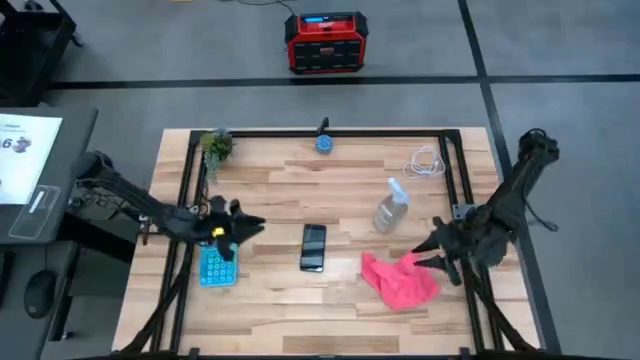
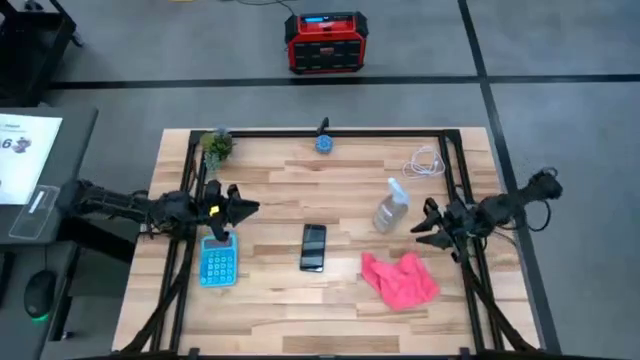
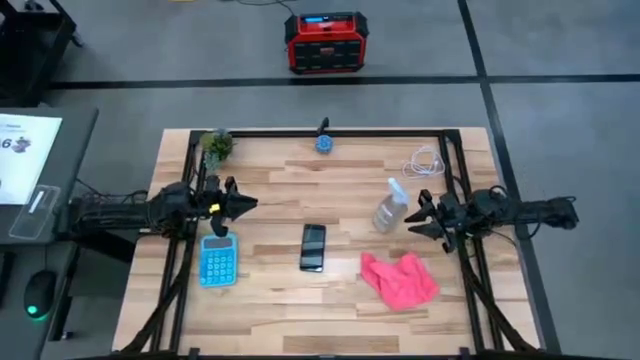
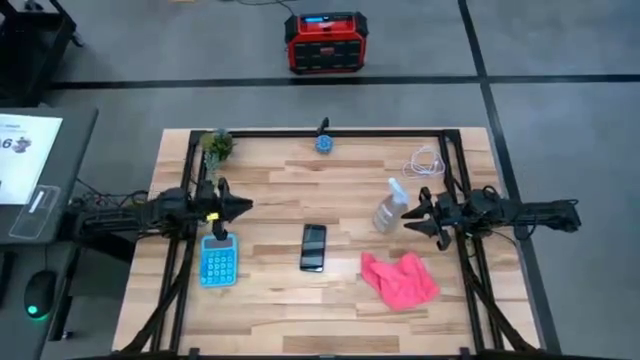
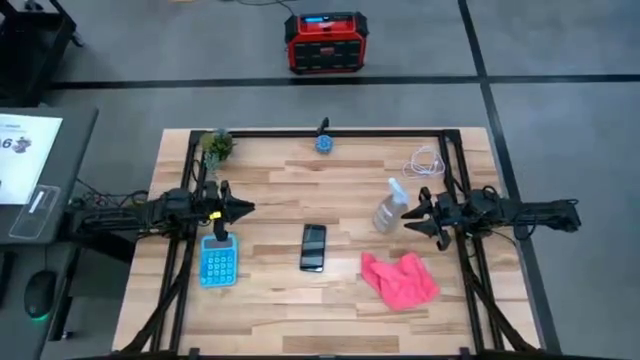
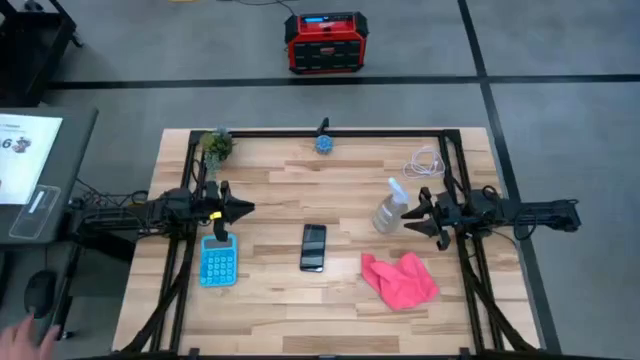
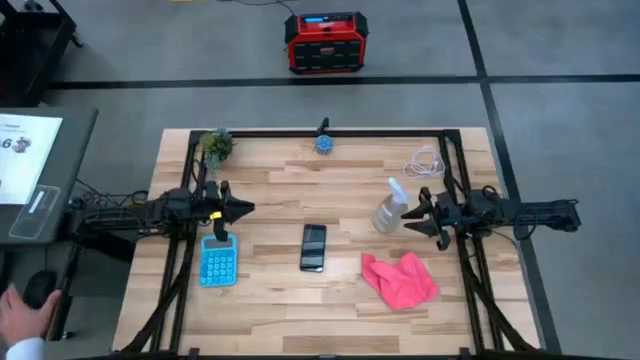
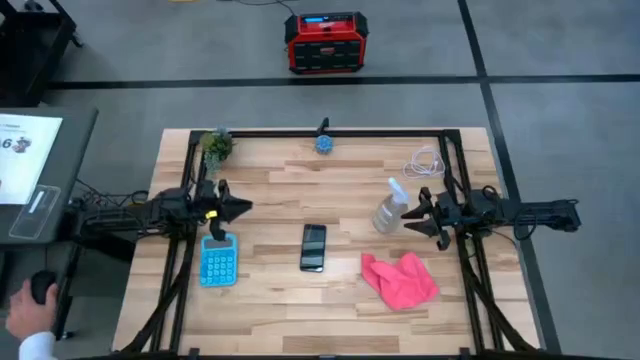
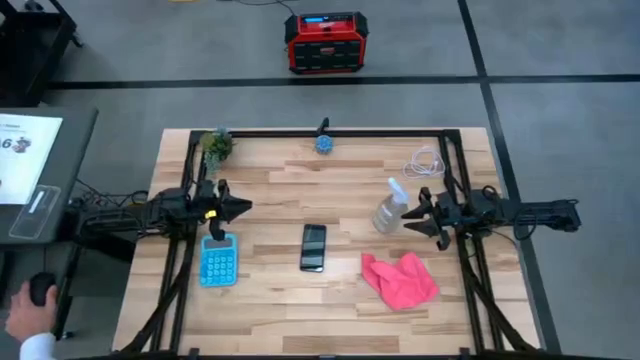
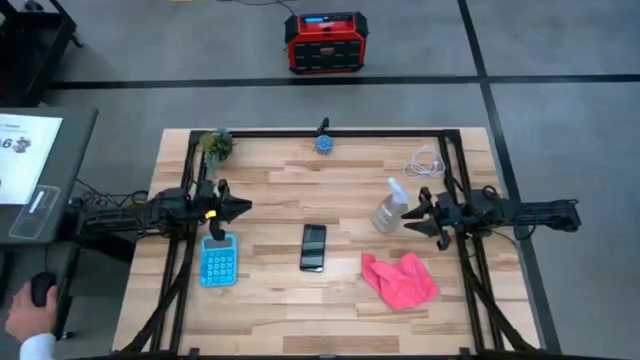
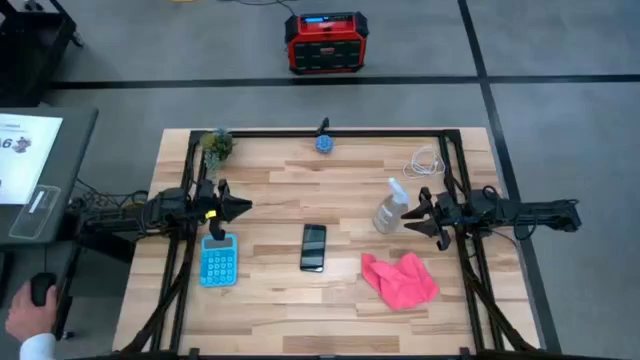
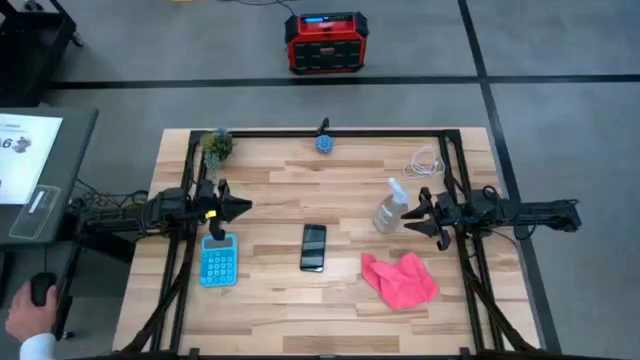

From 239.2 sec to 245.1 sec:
Task: Apply microfiber cloth
Return to Home Position

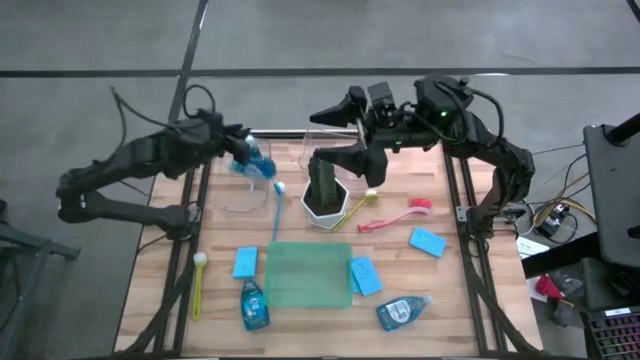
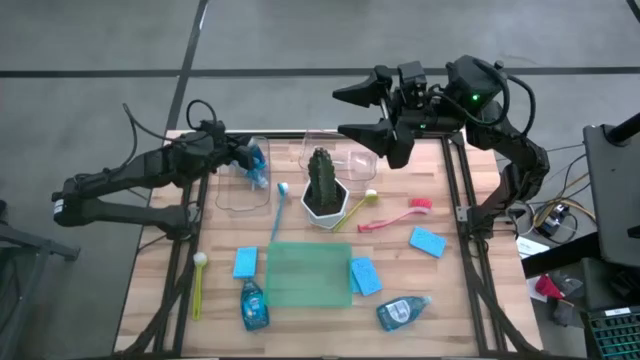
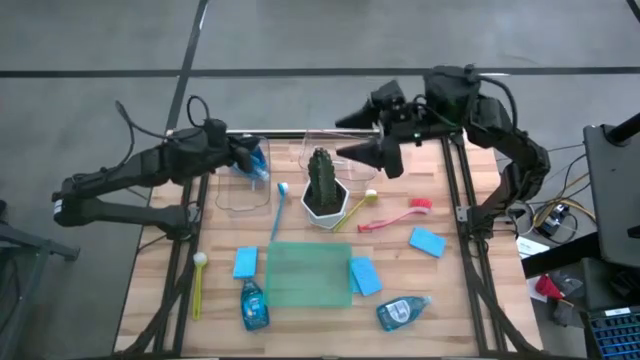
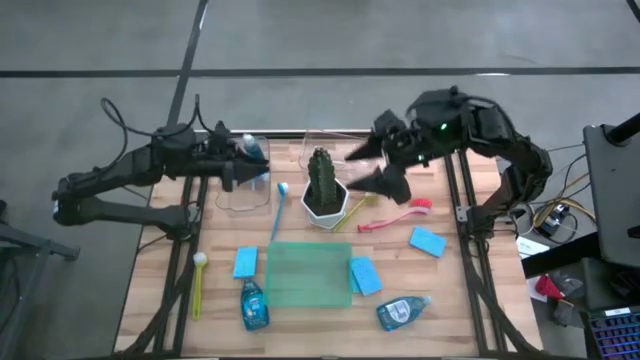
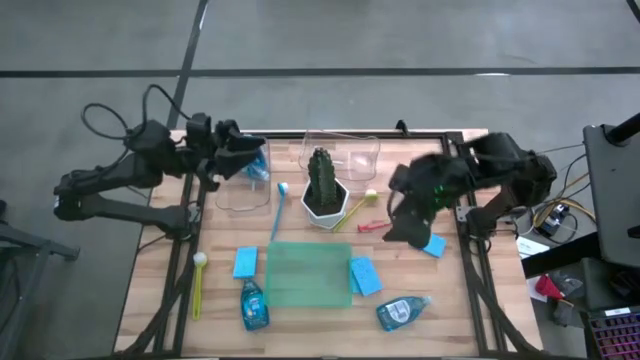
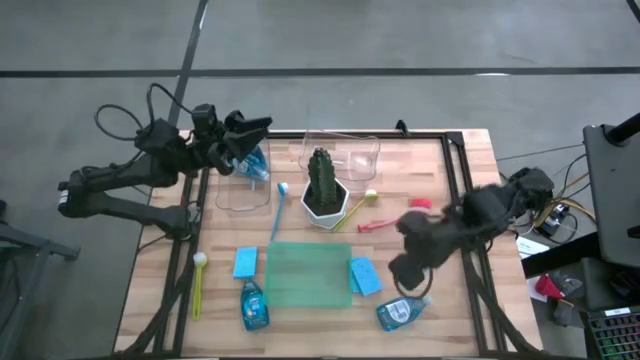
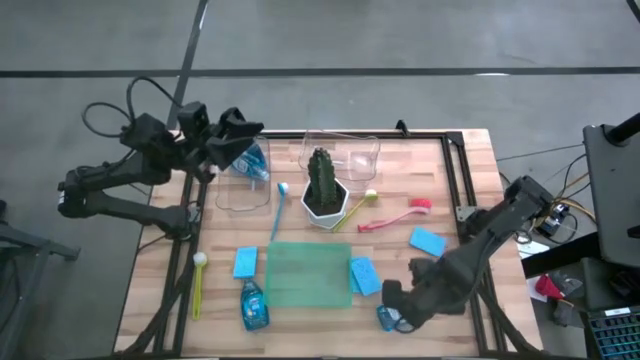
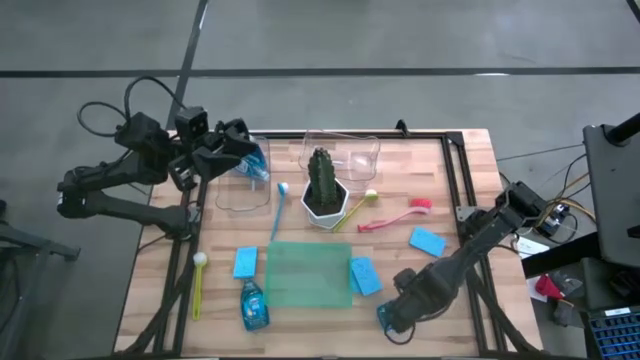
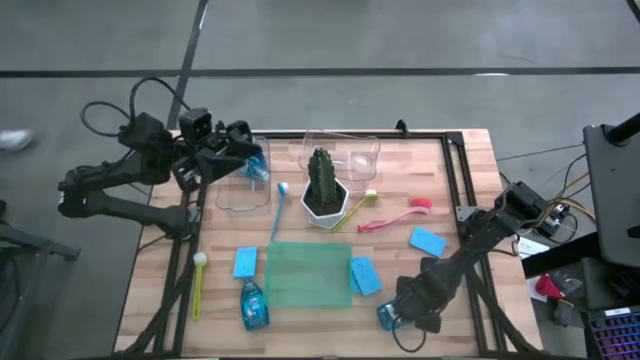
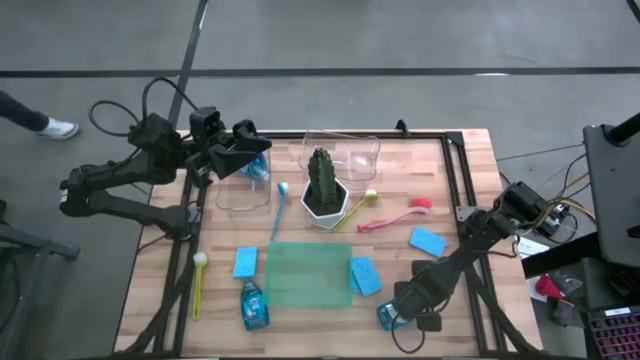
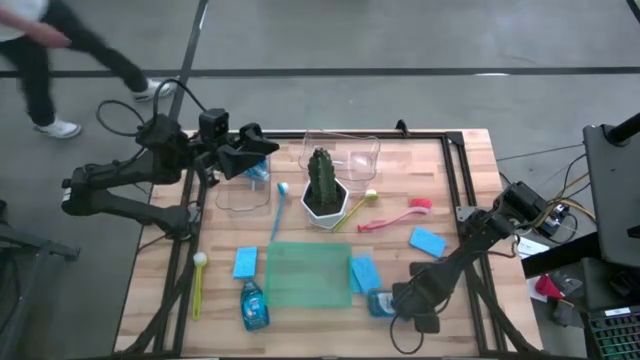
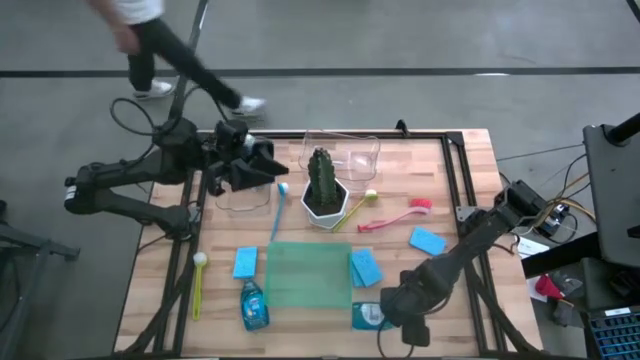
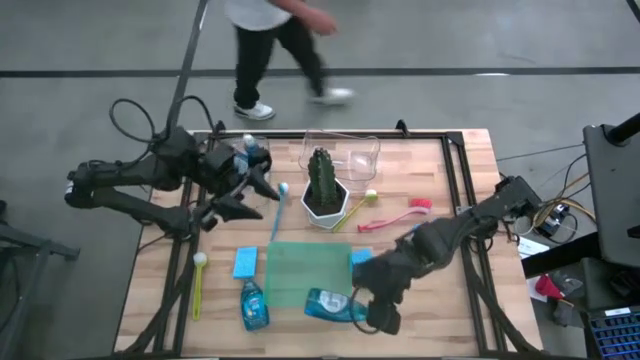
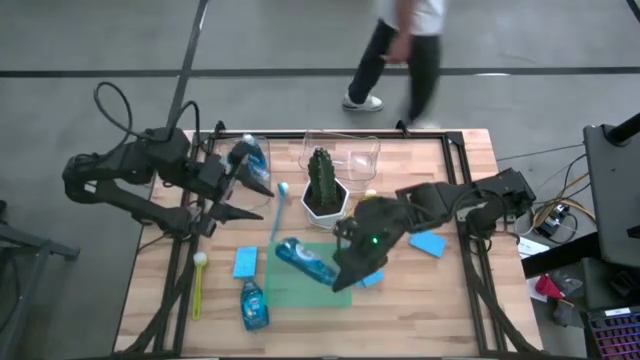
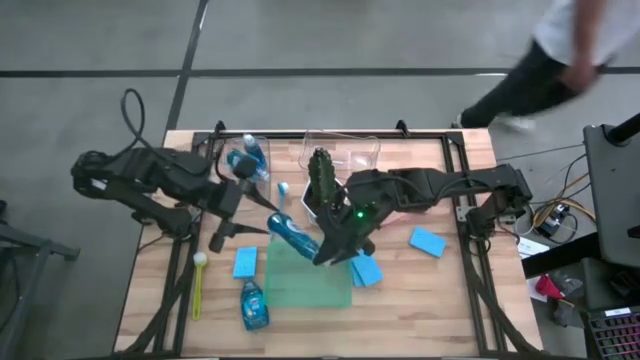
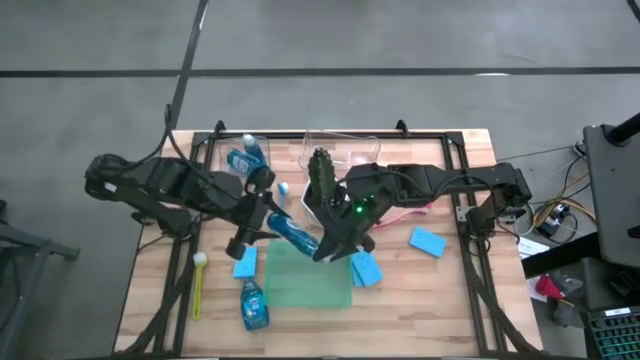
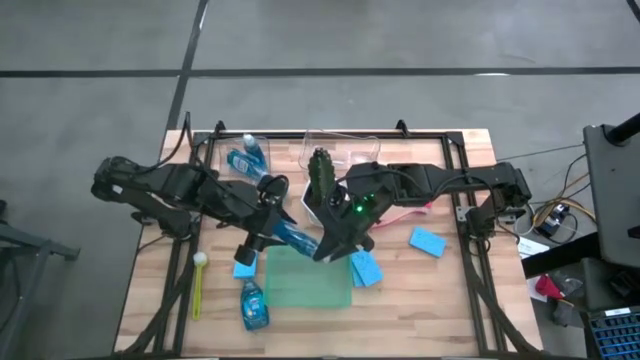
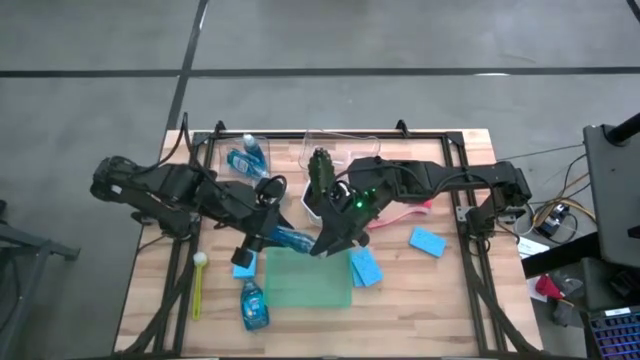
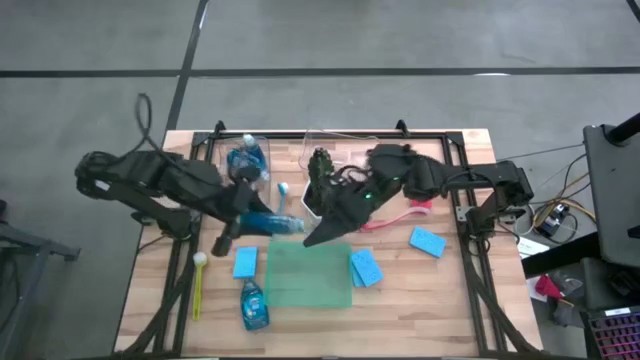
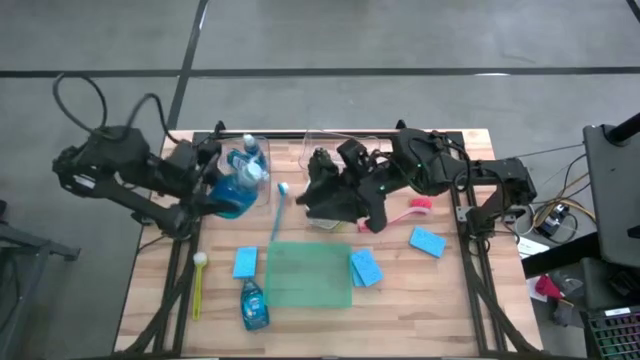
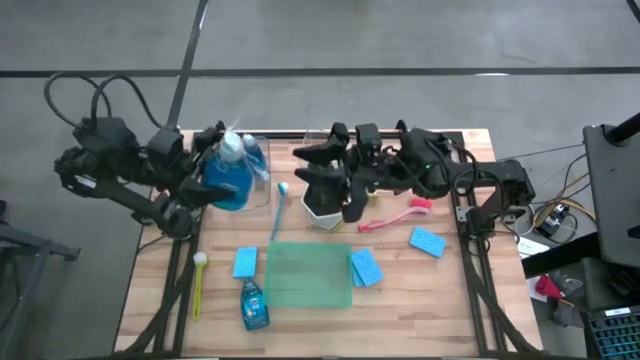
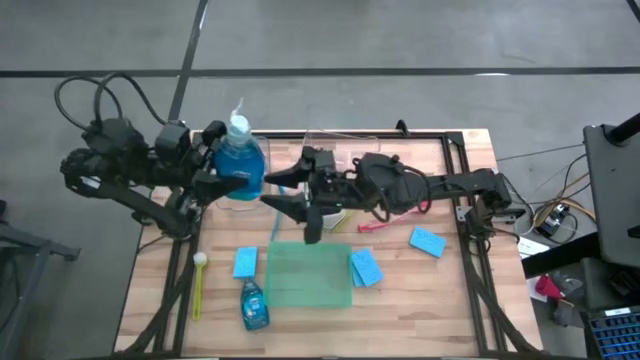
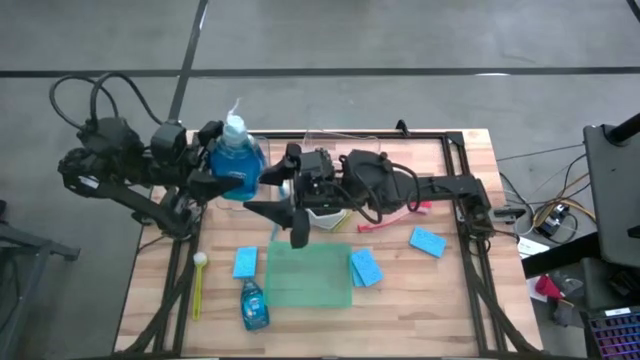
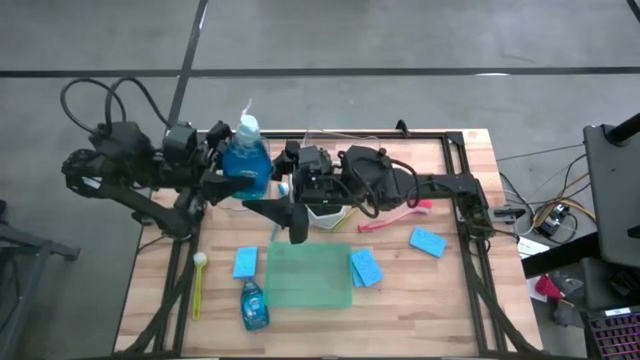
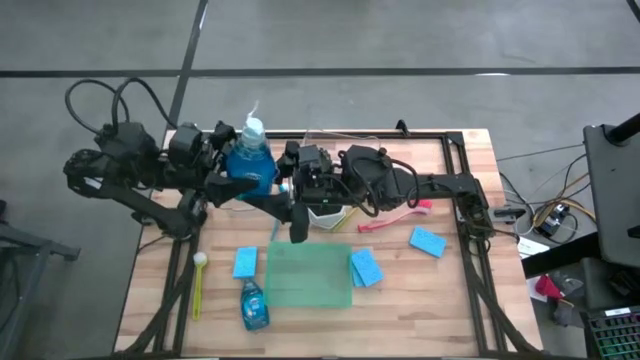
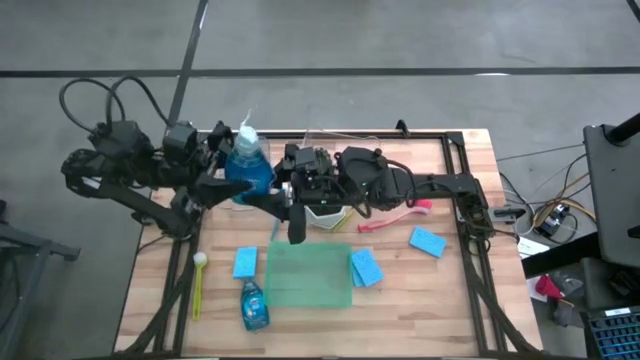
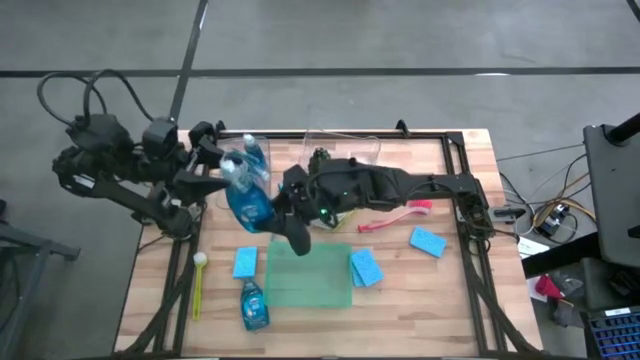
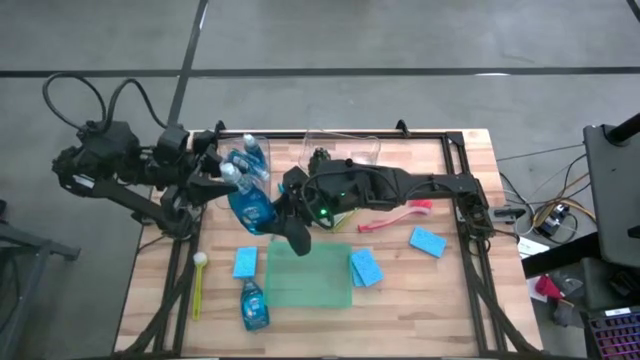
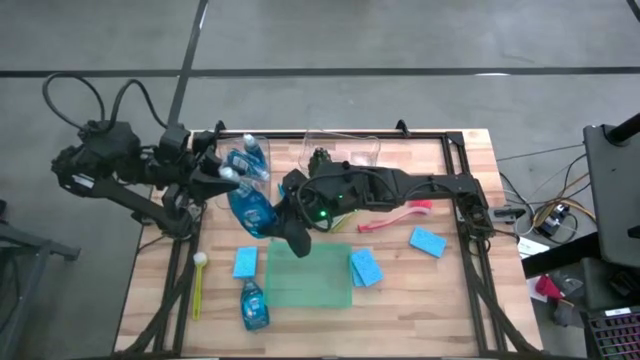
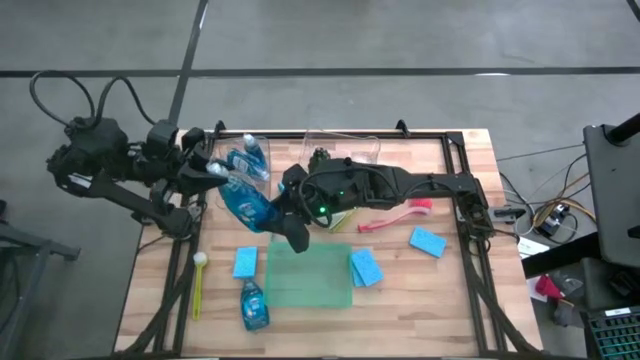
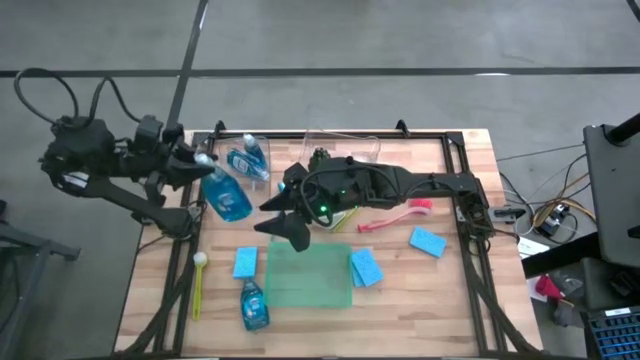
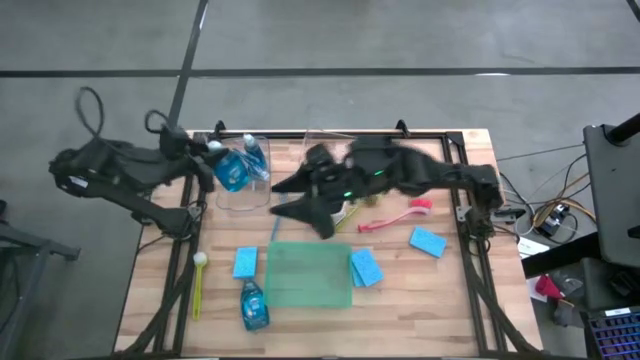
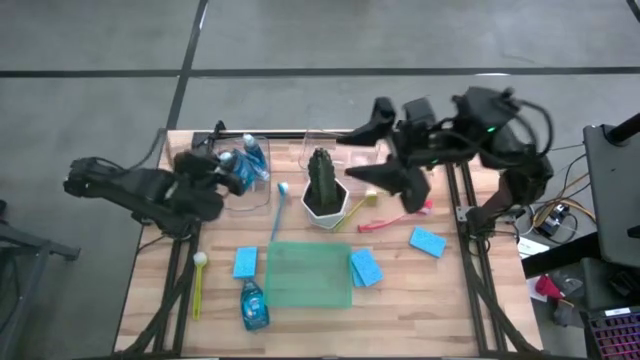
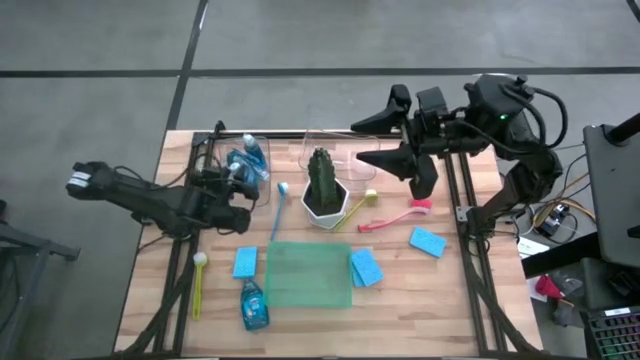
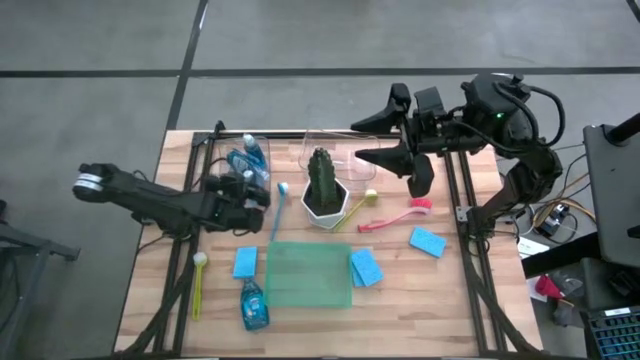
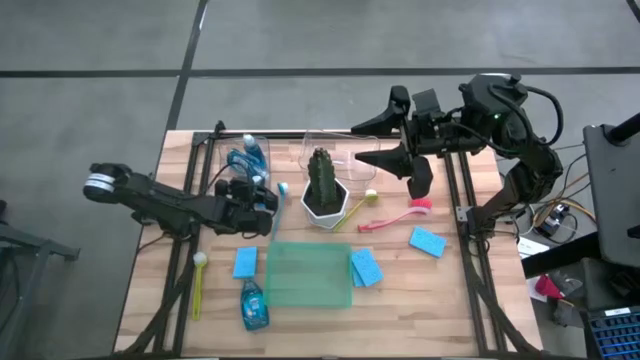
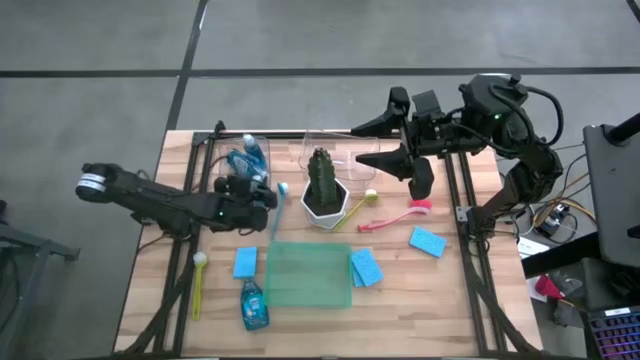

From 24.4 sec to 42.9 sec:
Task: Pick & Place Kitchen Sink Supplies
Put the blue dishwashing liquid into the left transparent bin
